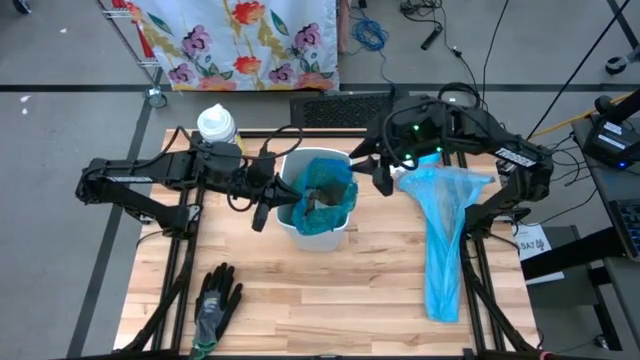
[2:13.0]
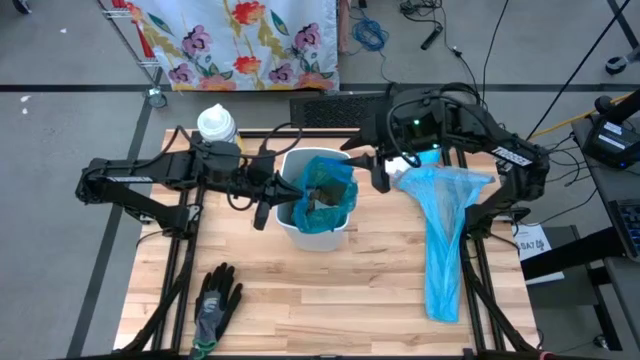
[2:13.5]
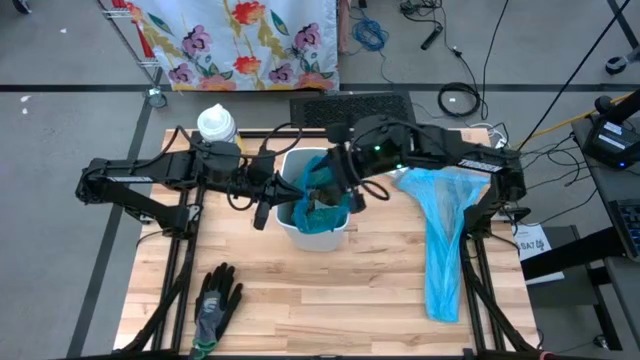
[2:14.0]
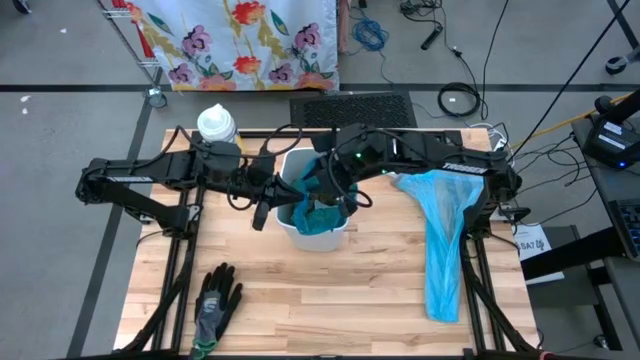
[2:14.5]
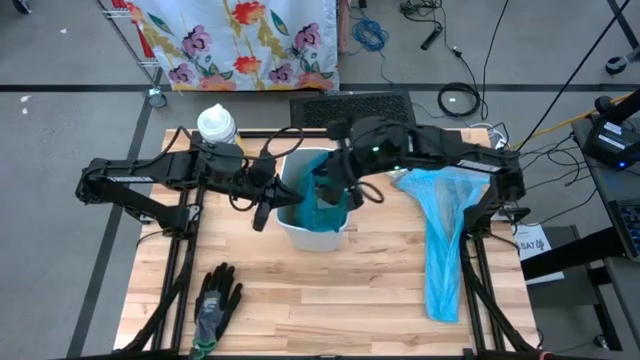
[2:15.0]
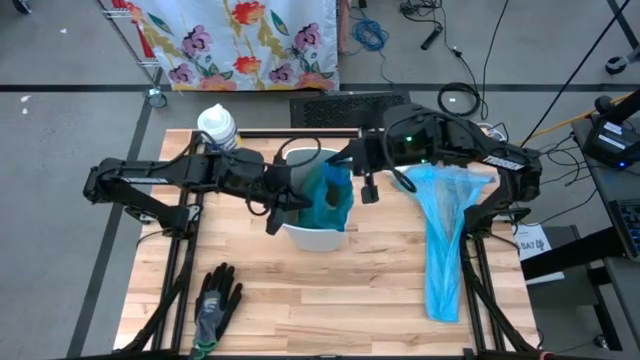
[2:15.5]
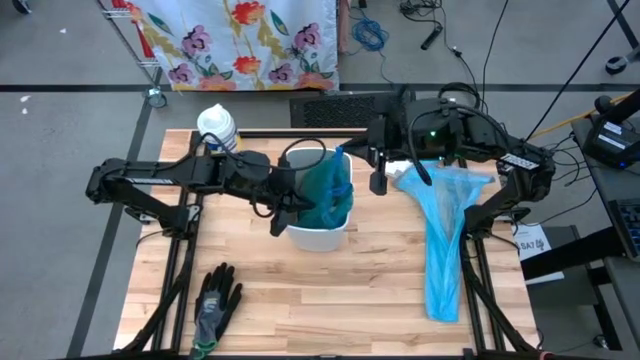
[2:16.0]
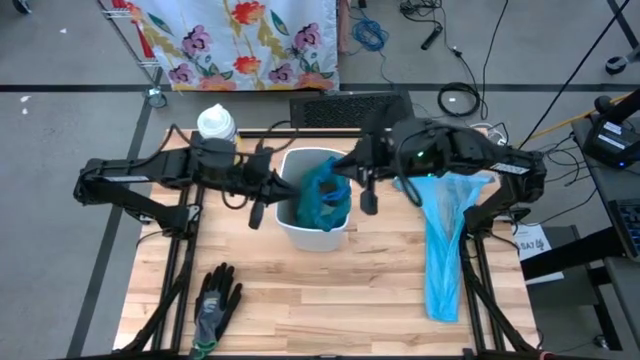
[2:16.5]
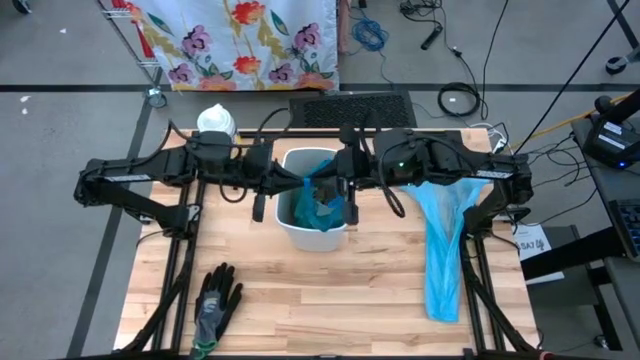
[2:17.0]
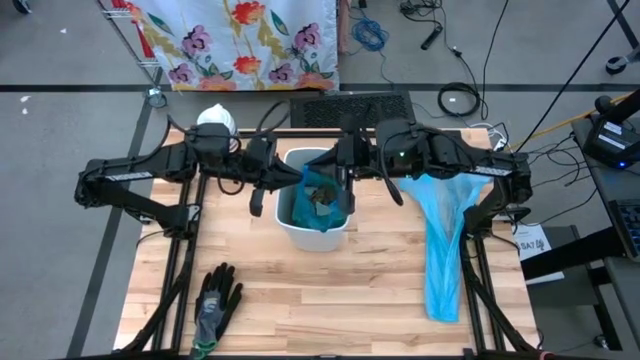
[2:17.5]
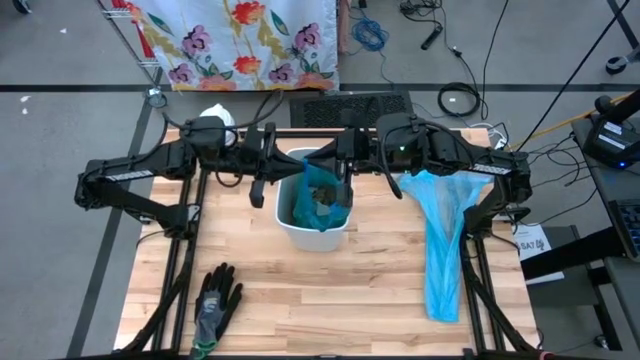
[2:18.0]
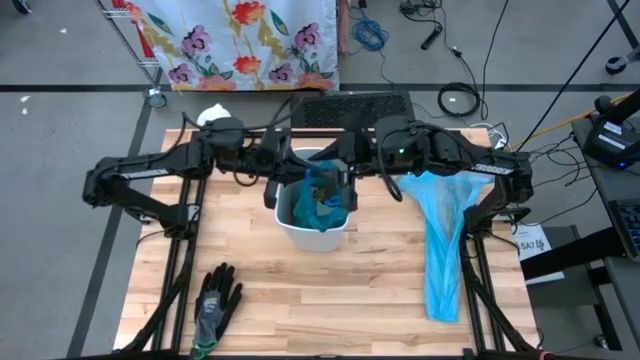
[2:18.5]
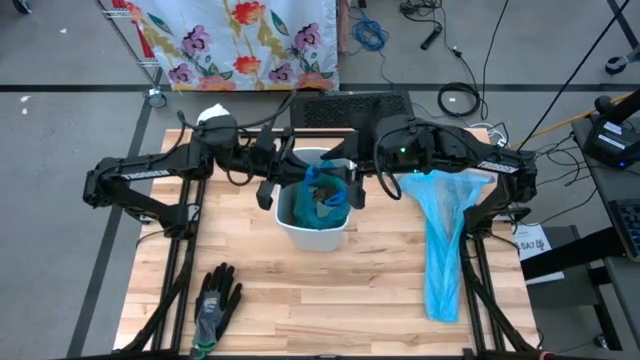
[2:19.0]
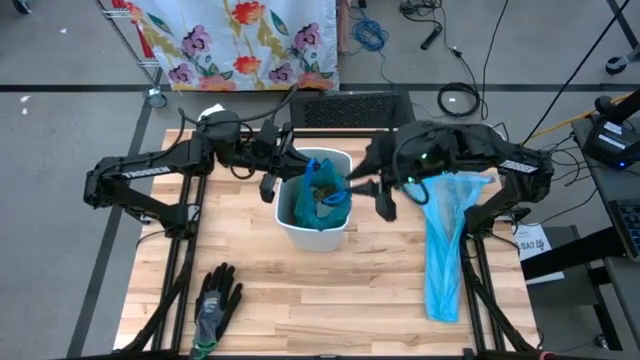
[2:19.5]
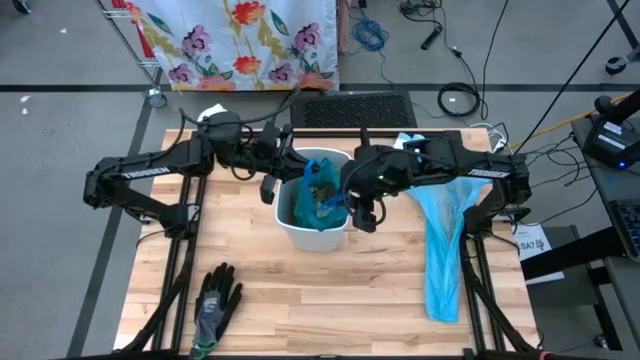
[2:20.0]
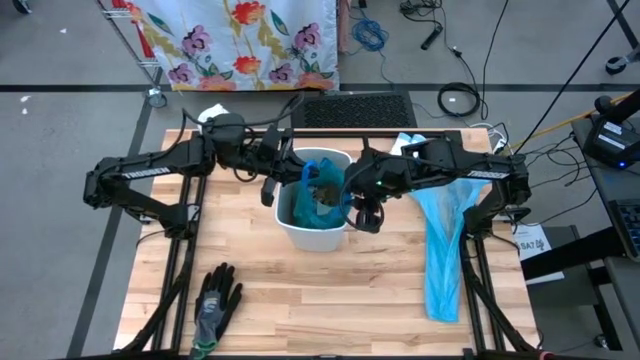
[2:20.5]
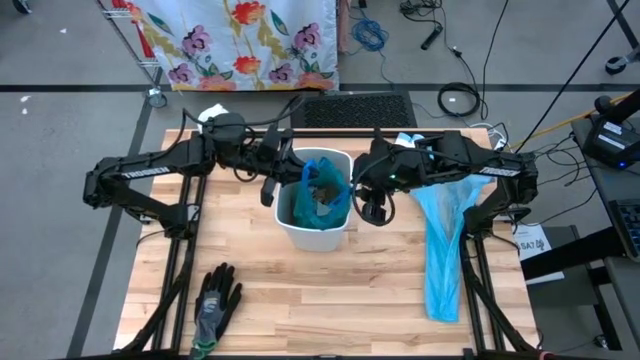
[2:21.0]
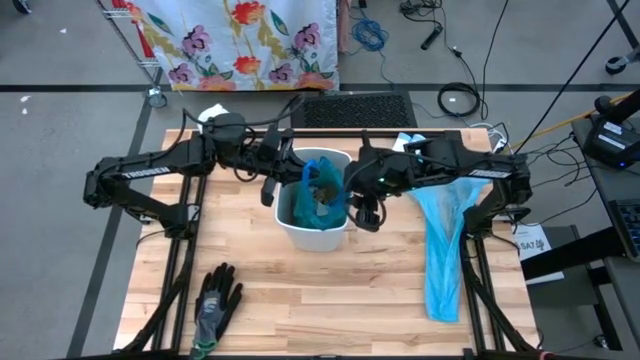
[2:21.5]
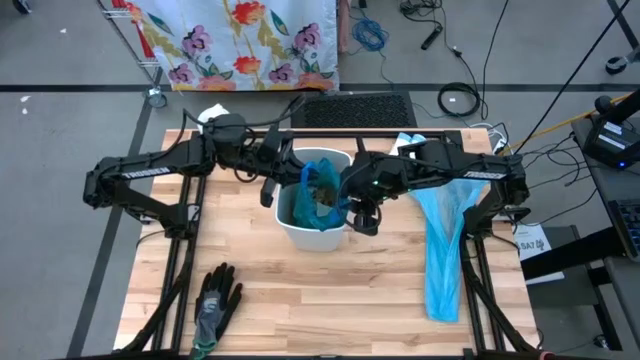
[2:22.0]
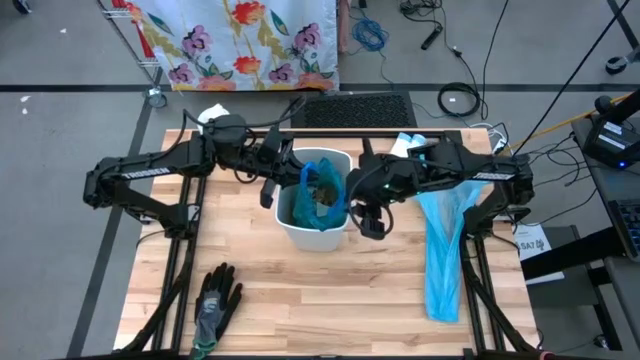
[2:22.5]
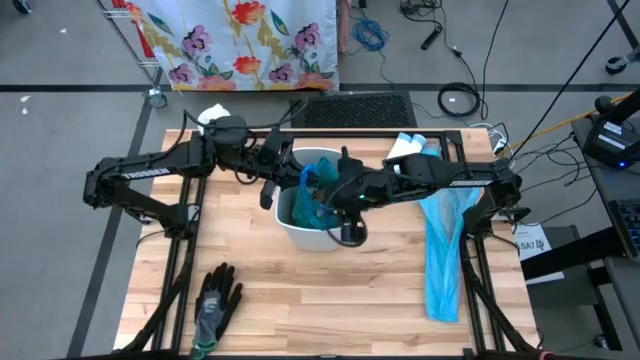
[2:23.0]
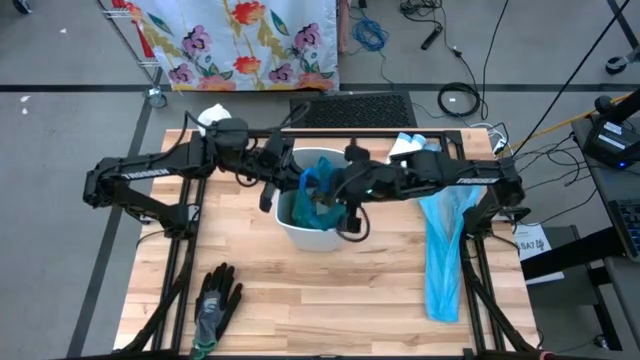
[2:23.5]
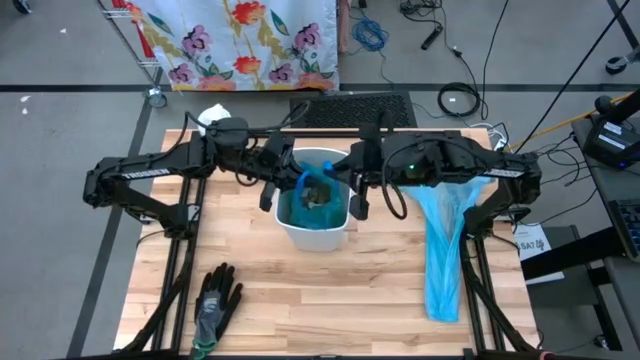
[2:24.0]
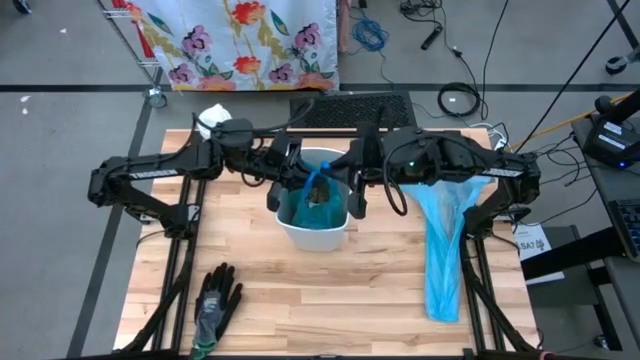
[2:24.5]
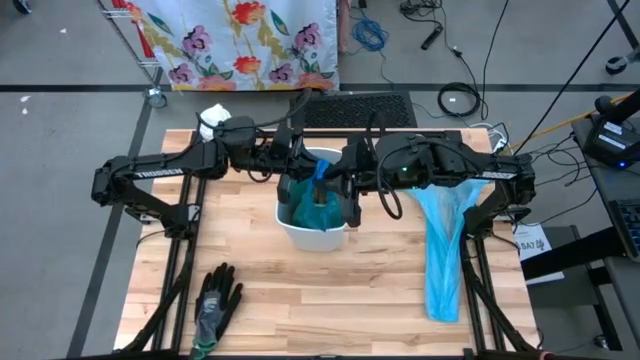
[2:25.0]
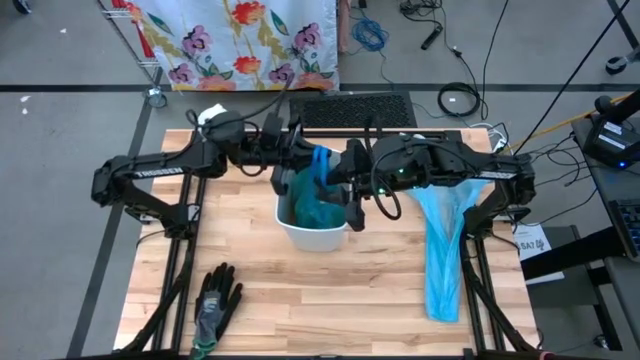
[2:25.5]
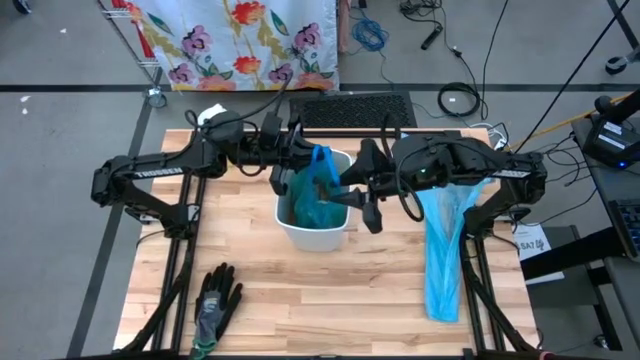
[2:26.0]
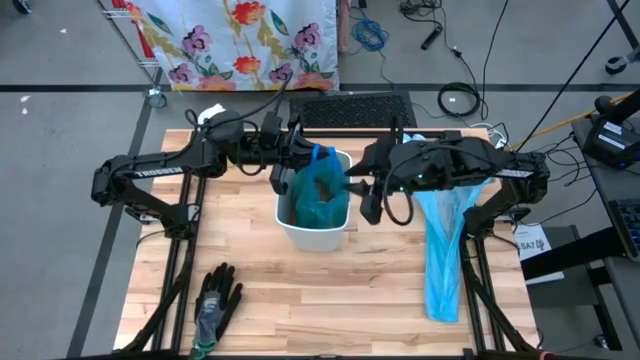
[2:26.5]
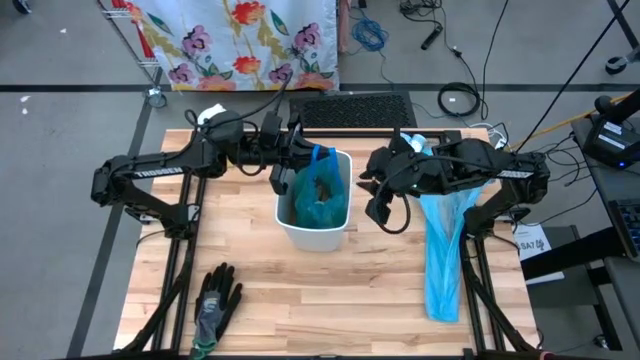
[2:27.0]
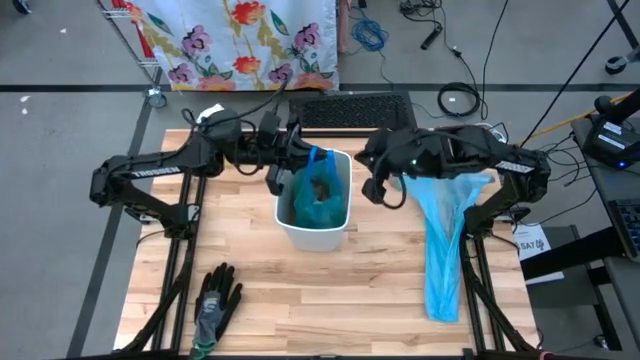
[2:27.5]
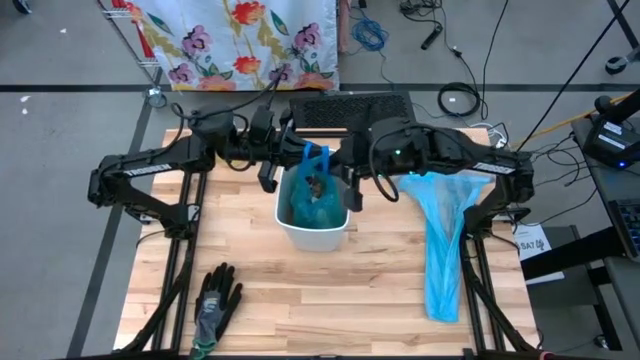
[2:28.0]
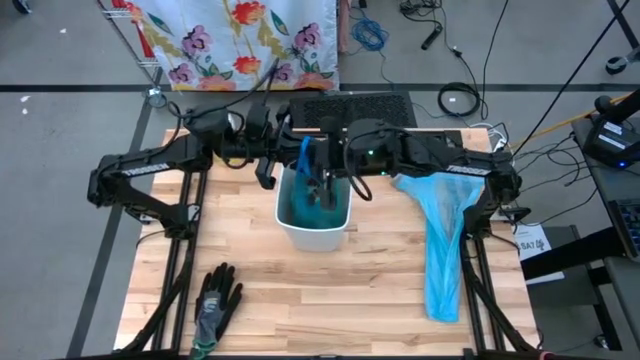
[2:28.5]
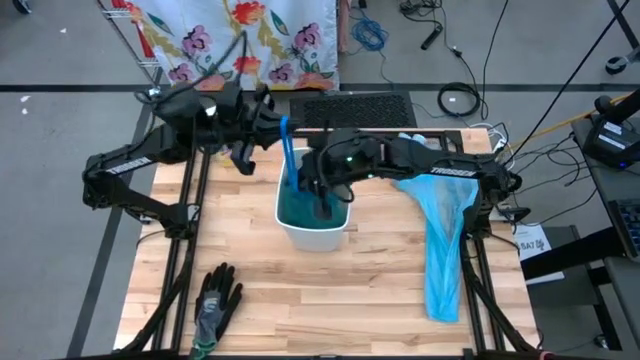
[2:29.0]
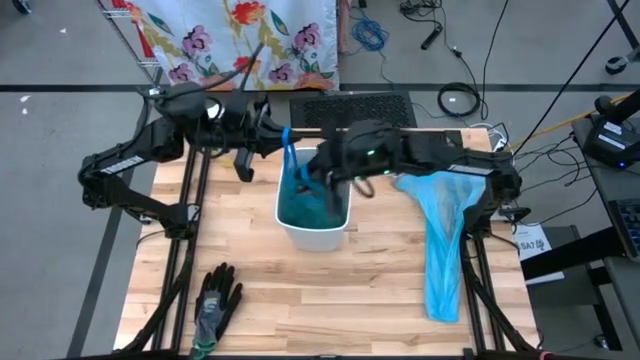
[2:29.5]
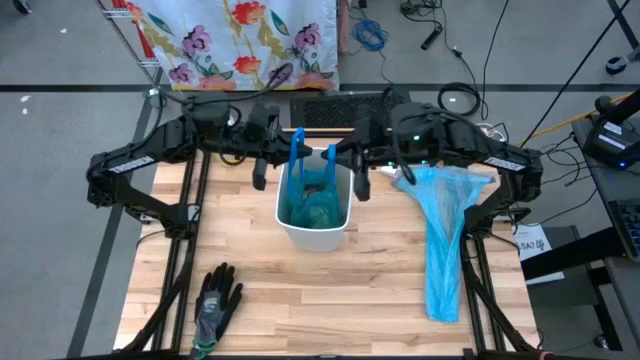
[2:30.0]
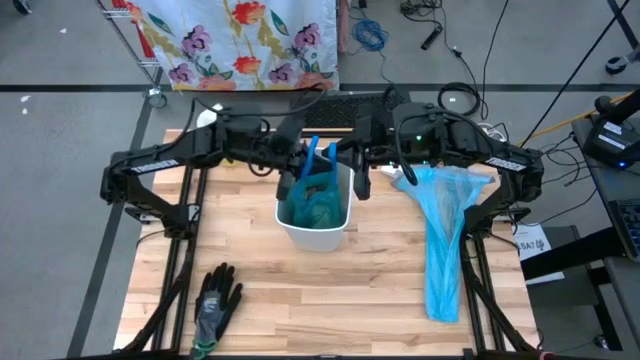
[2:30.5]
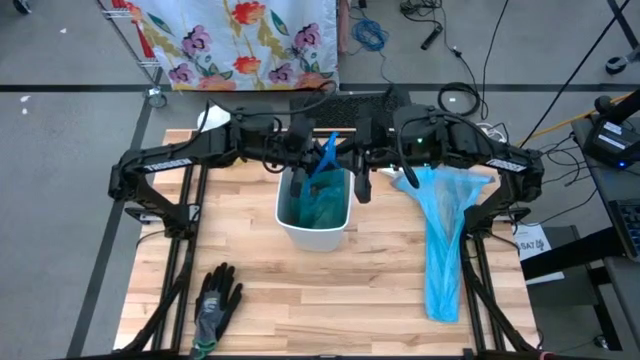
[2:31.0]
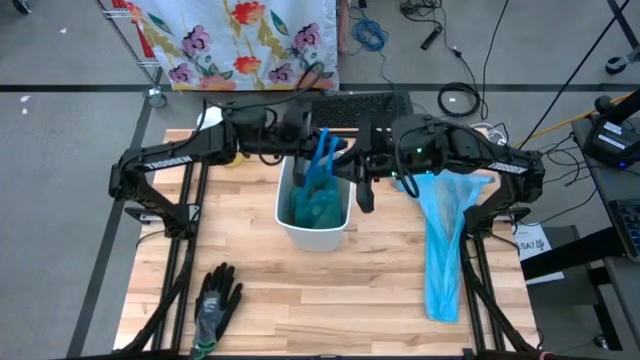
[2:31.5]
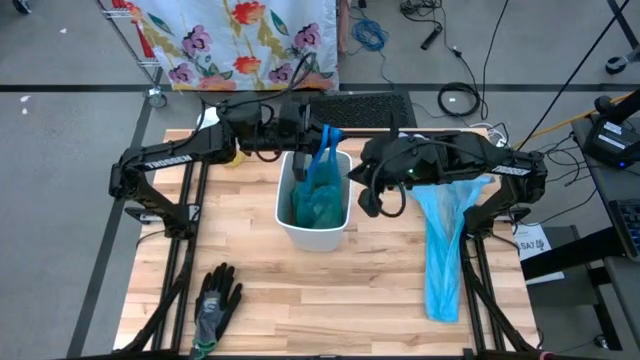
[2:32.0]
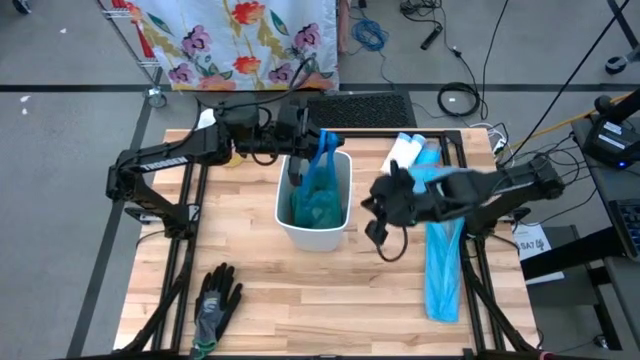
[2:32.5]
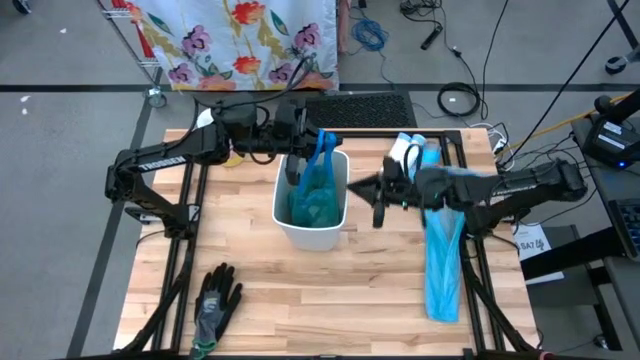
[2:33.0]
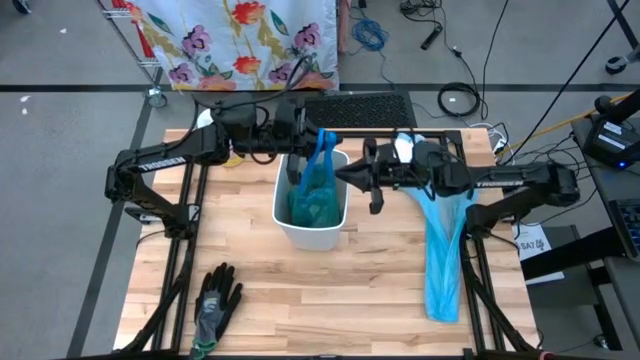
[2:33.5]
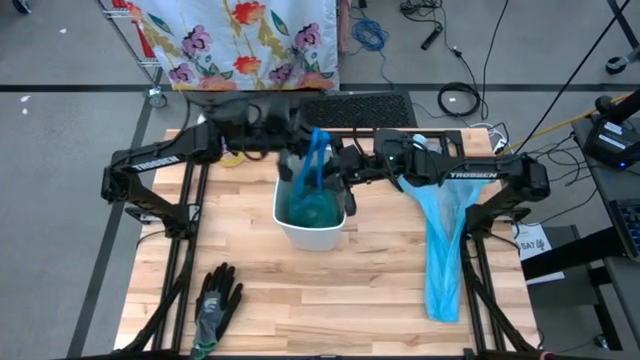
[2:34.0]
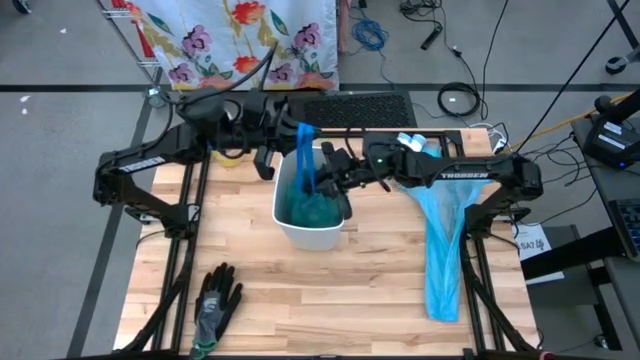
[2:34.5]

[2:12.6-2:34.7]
Task: place trash/remove bag and relplace
Close the blue trash bag
